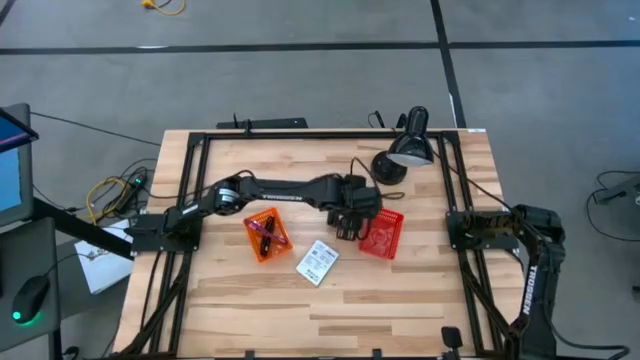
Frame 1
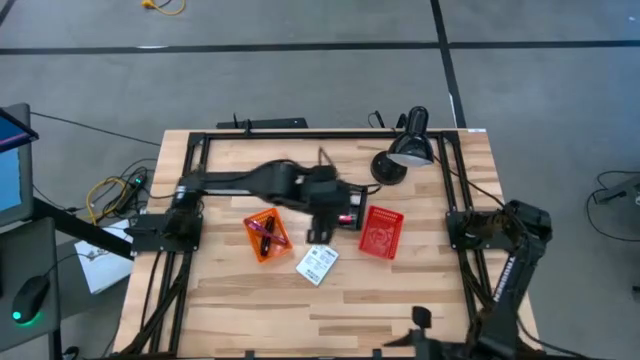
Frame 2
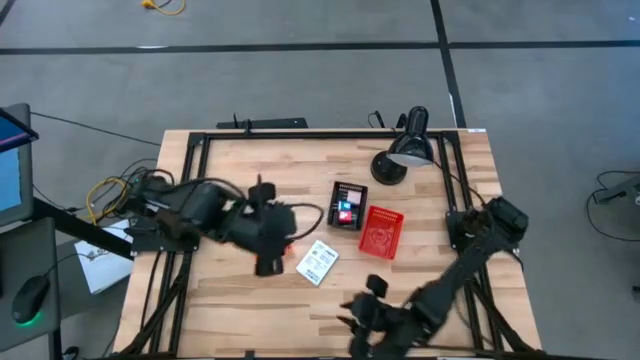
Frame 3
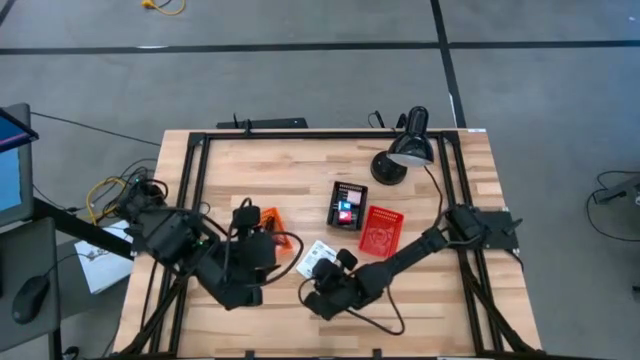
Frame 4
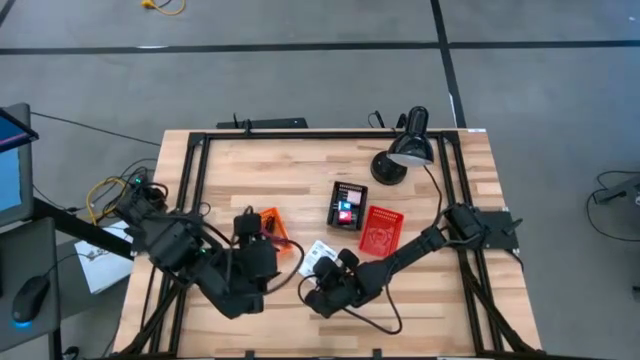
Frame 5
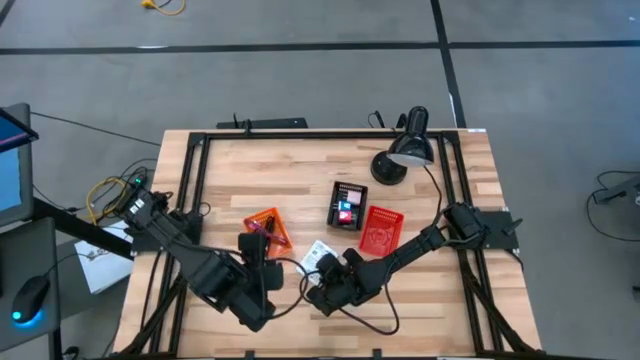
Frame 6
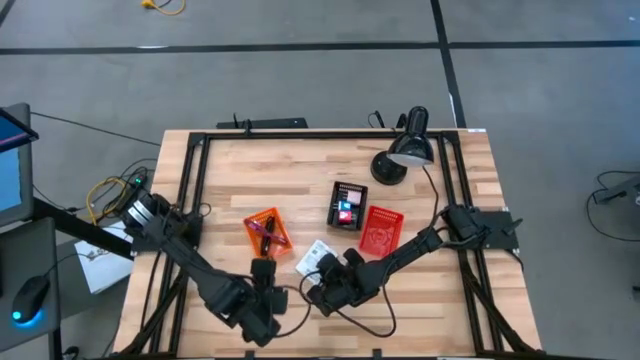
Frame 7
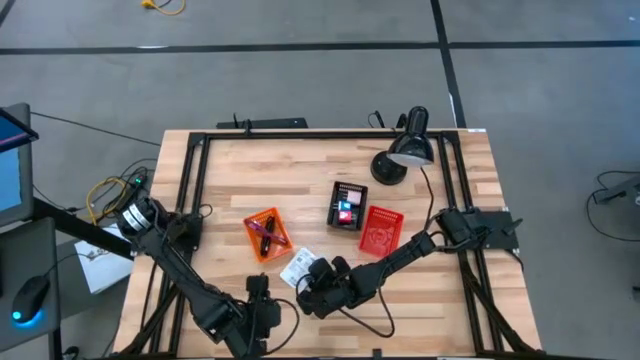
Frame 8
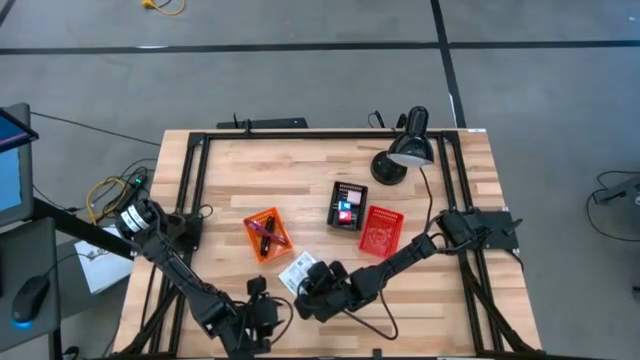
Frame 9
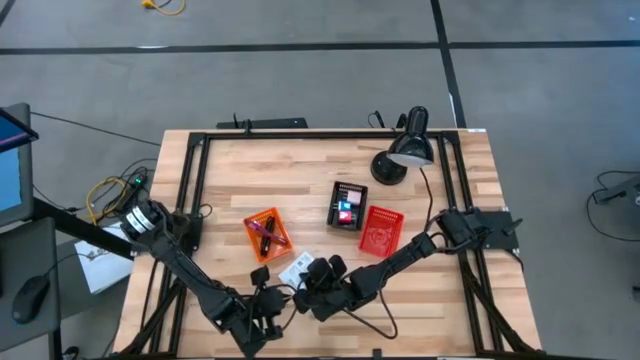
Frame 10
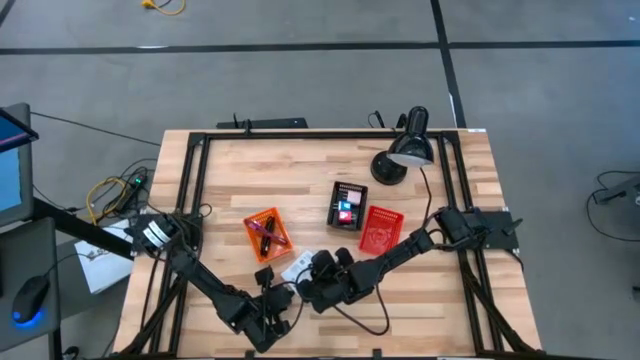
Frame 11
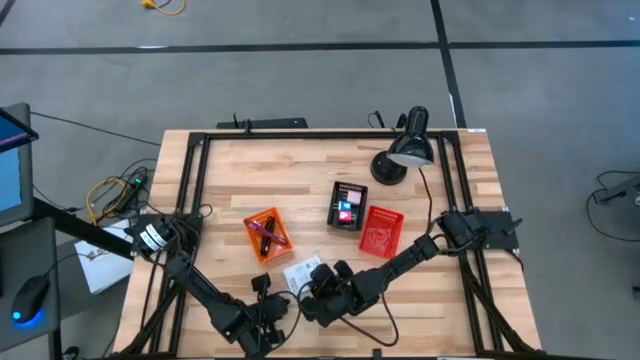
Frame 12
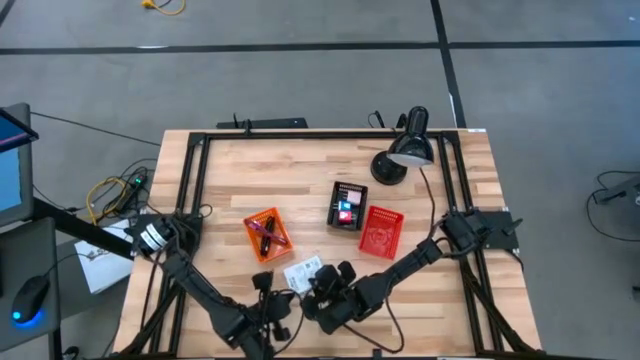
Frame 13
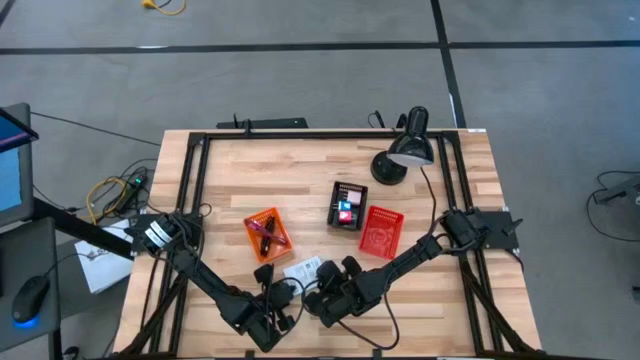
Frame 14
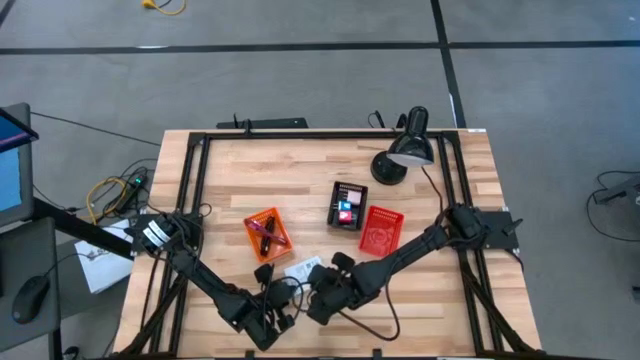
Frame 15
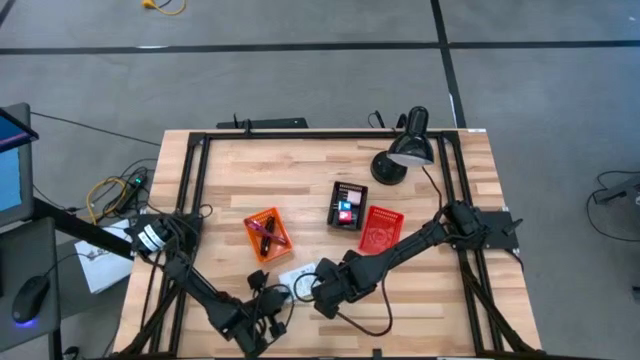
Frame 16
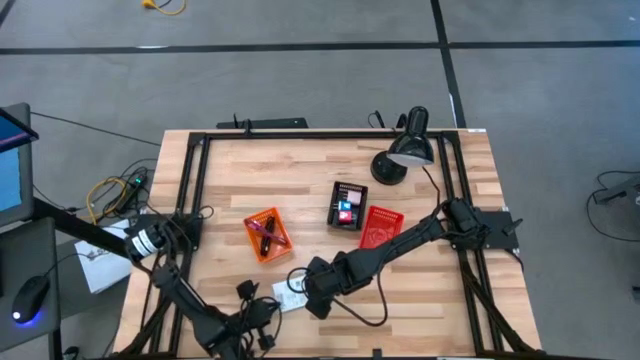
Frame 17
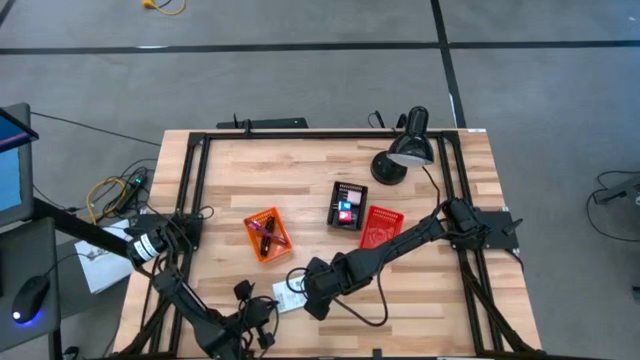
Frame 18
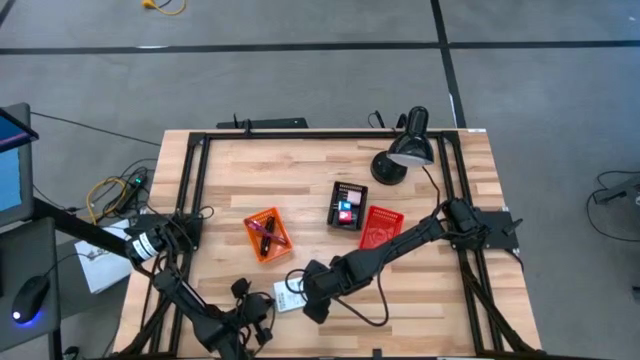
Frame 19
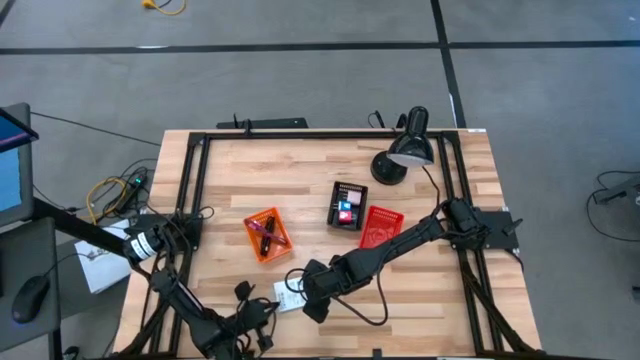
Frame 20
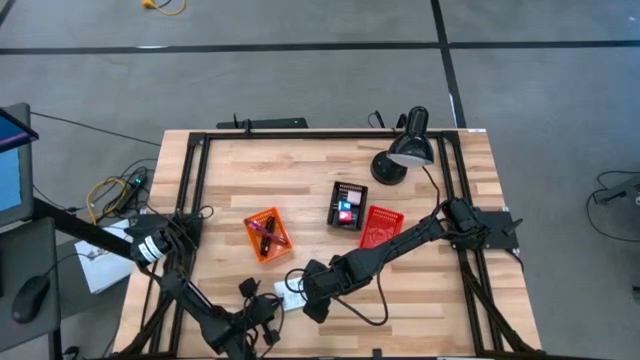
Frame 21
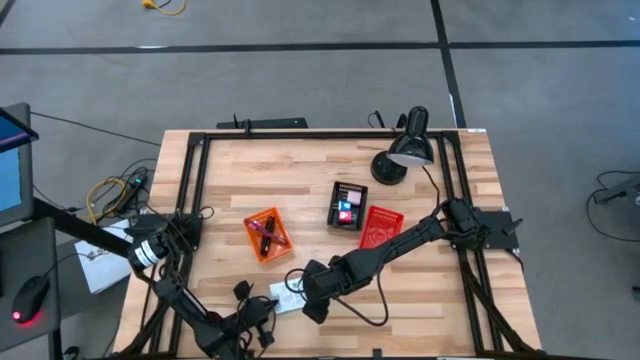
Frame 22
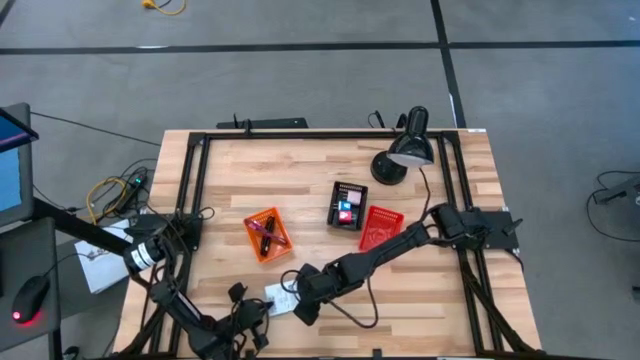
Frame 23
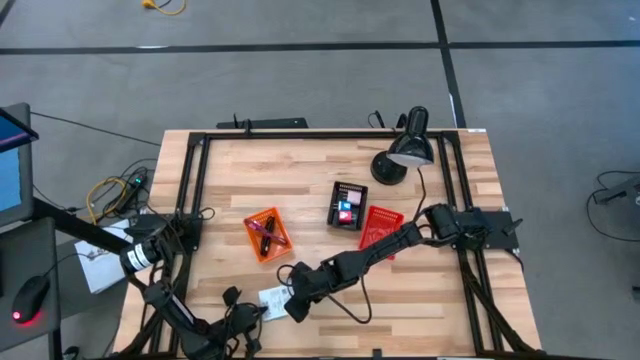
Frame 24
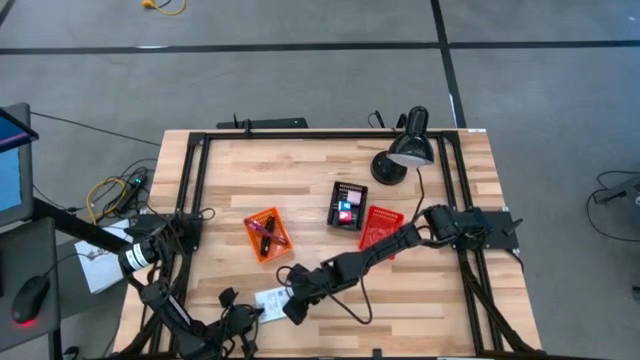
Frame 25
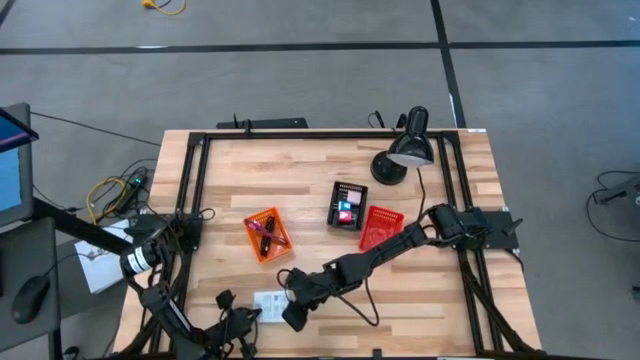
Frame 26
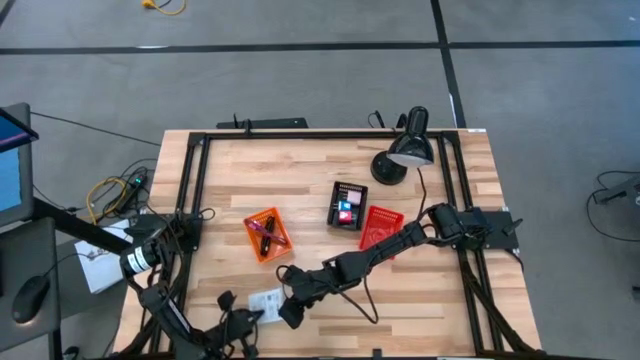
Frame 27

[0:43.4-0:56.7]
Task: Pick and place items into bin
Put the white card reader box into the red bin

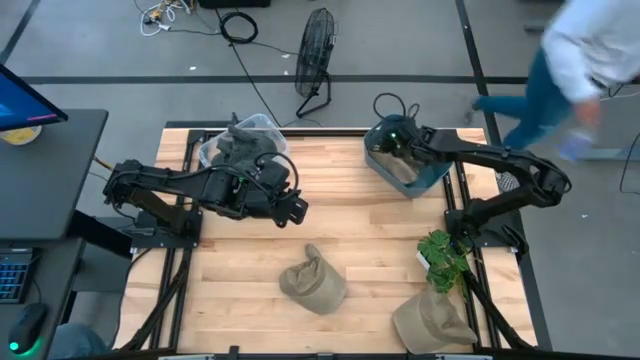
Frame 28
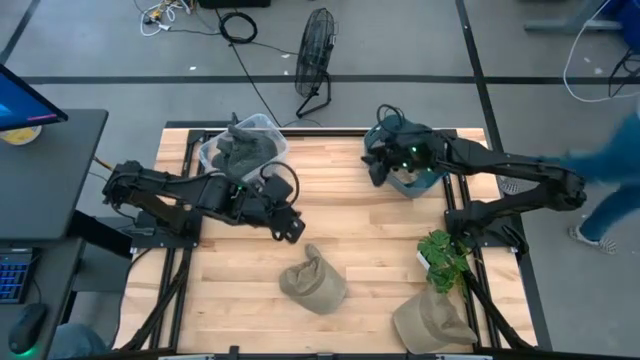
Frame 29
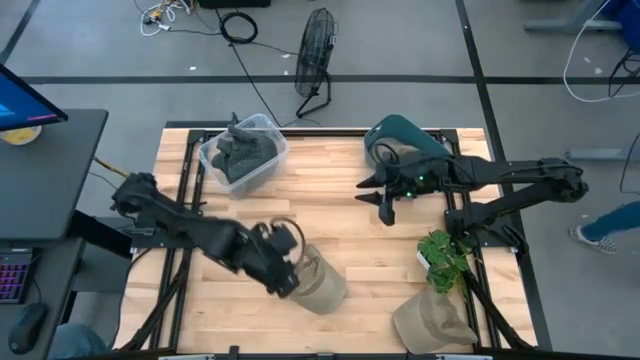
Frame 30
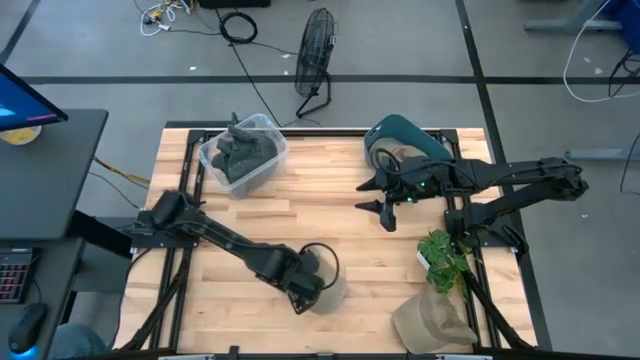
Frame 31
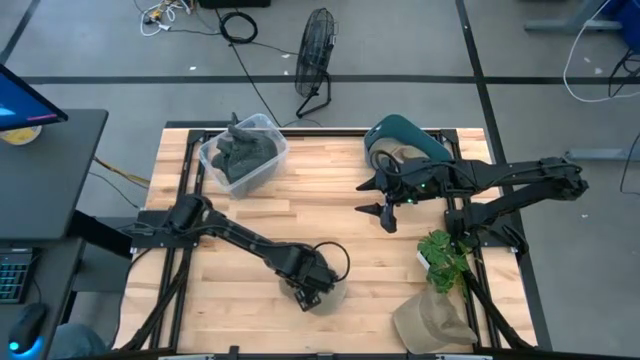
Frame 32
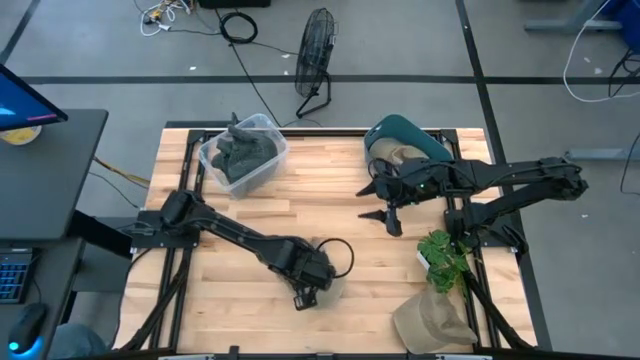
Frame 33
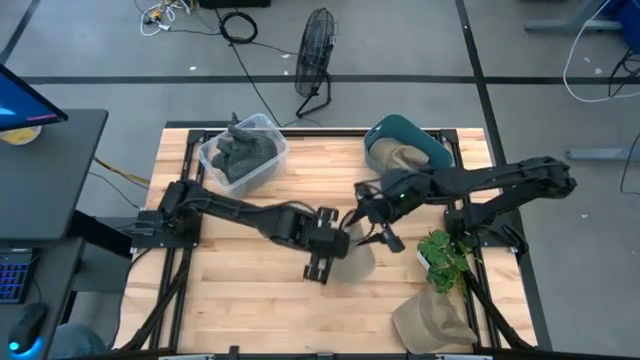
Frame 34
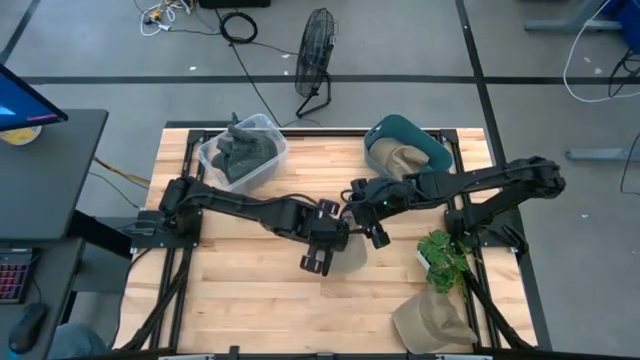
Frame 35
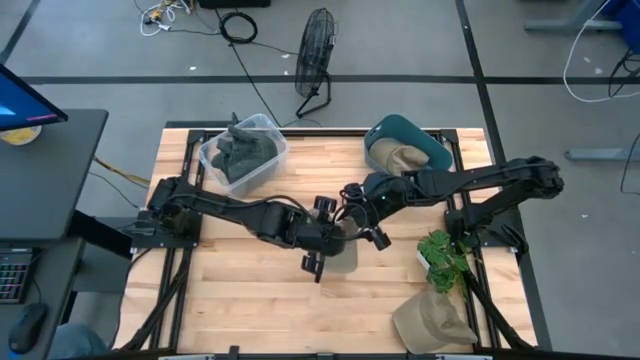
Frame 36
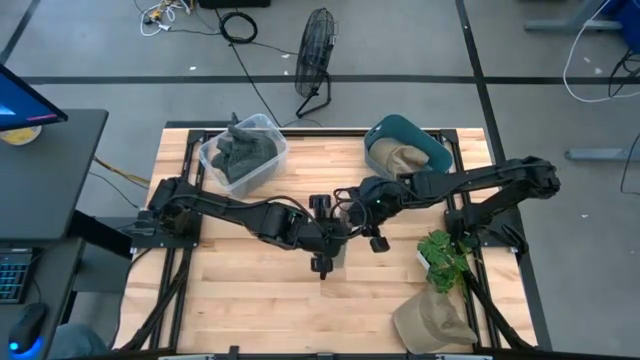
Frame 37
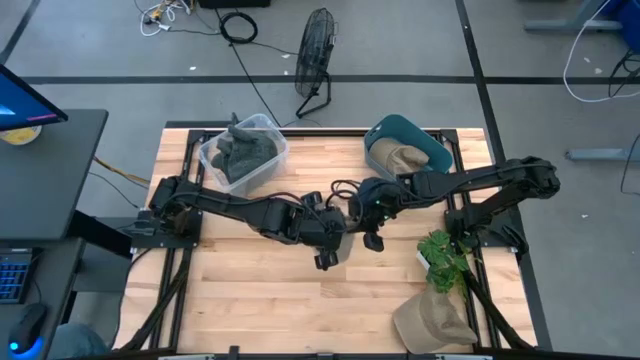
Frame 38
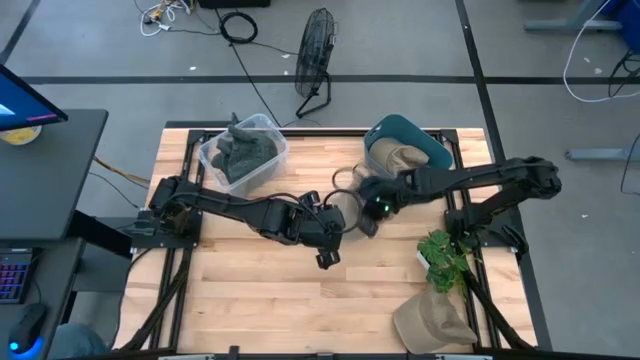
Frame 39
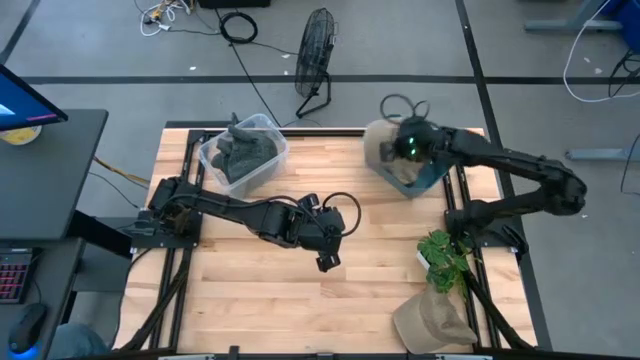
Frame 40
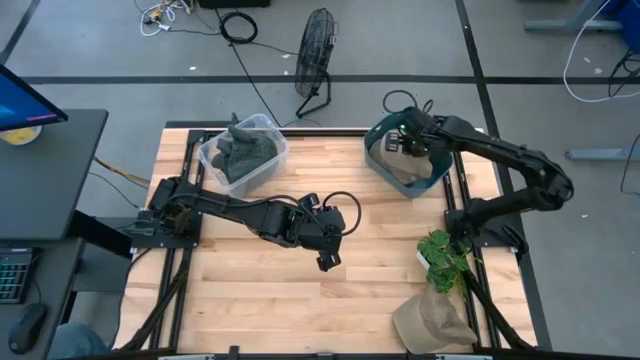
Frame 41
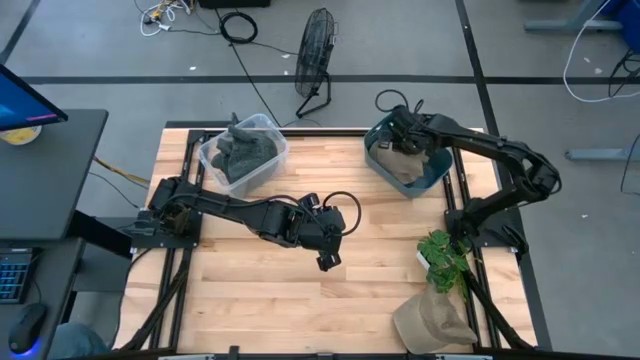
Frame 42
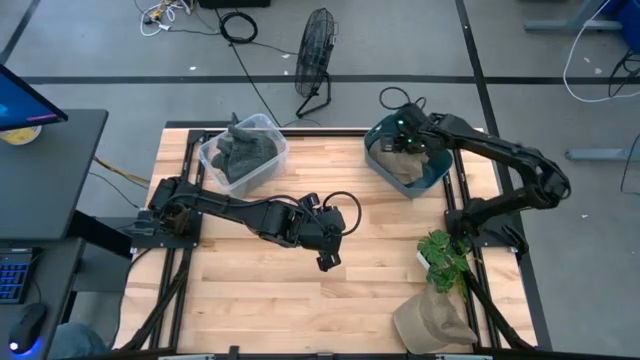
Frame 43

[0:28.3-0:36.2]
Task: Pick & Place hat
Put the left light brown cap into the blue bin
